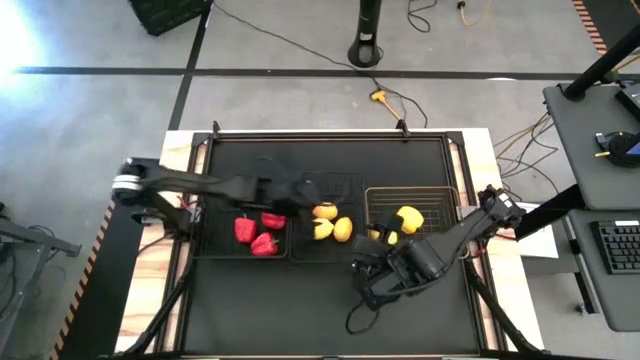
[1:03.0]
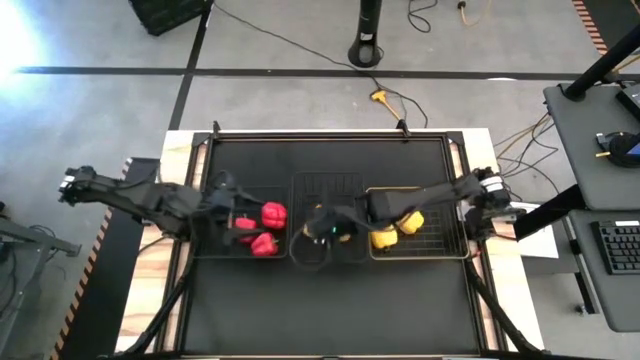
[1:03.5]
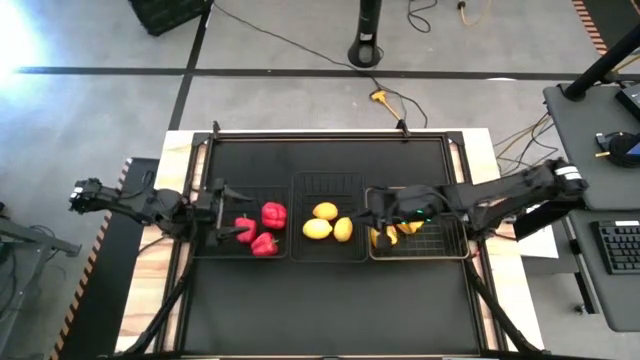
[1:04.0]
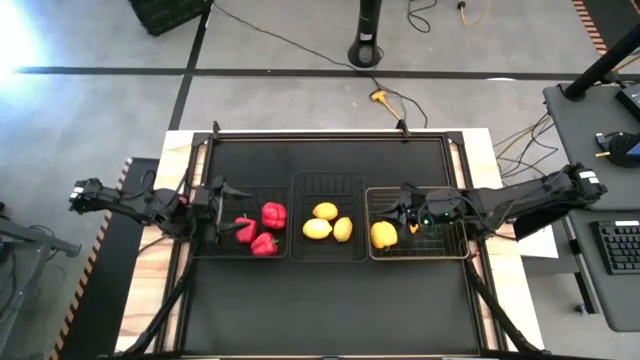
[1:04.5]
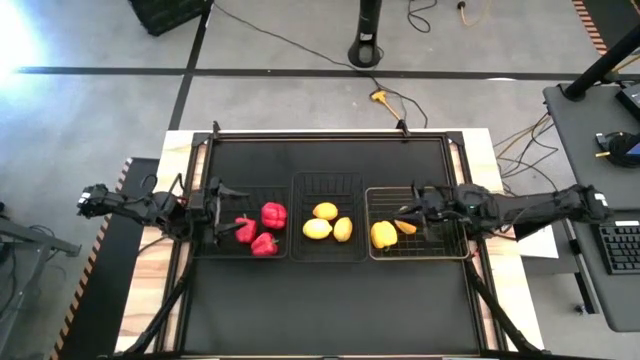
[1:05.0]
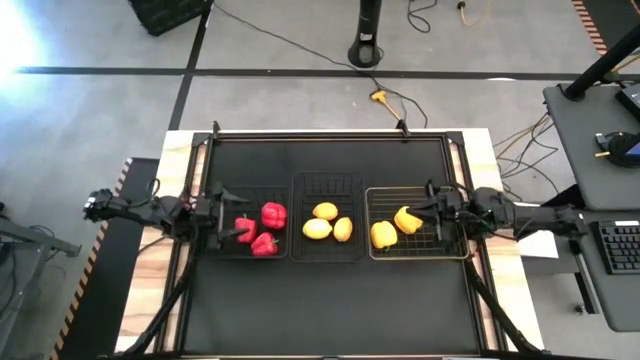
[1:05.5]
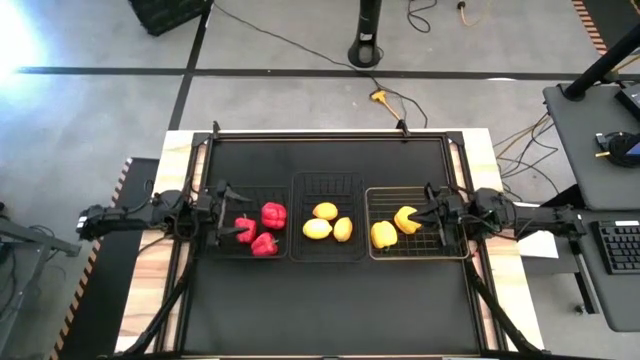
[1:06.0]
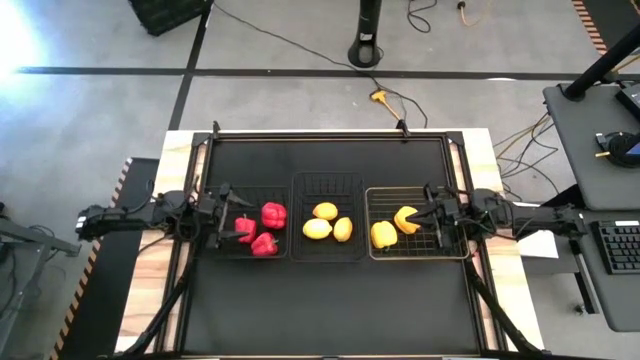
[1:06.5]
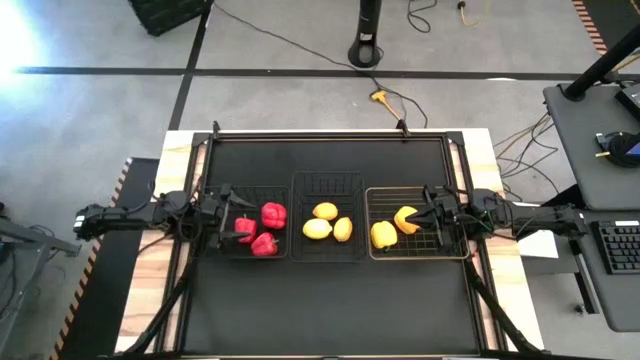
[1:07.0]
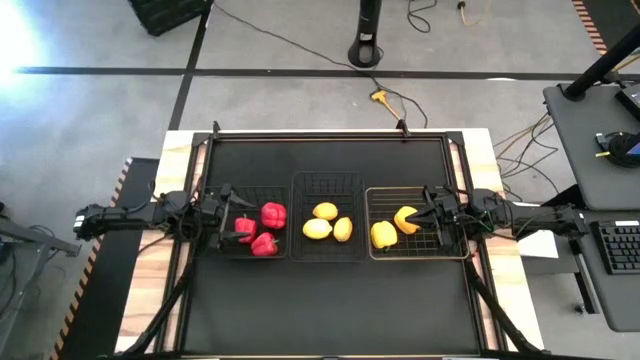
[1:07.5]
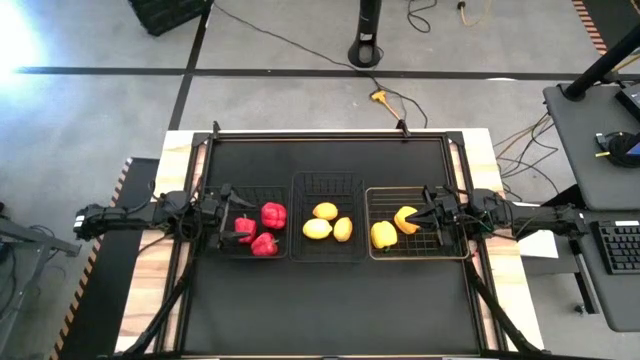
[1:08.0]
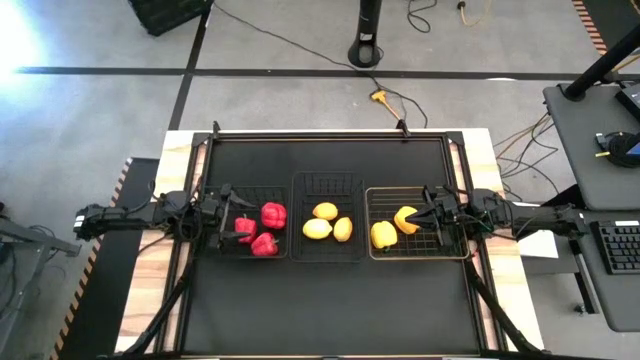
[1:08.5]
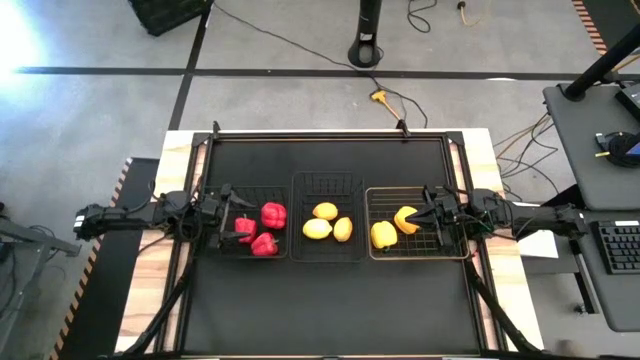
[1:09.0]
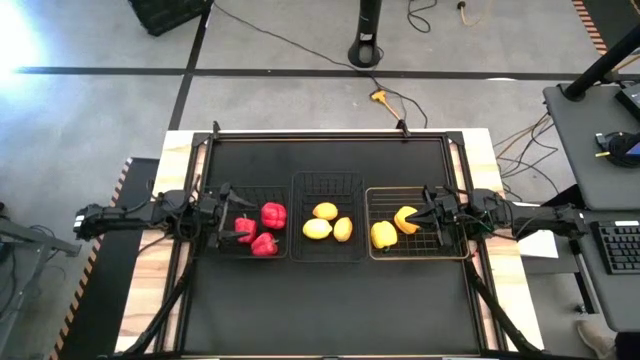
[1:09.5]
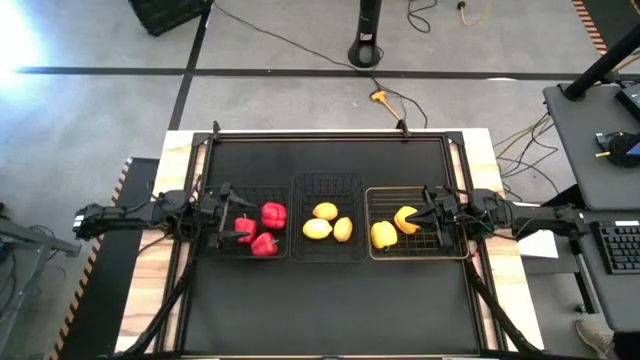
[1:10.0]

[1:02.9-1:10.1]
Task: Sort produce into baskets
Return to Home Position

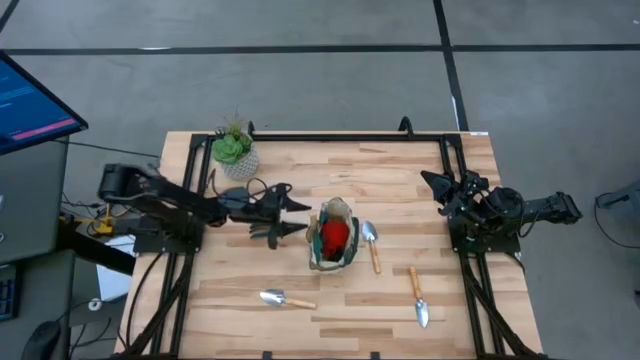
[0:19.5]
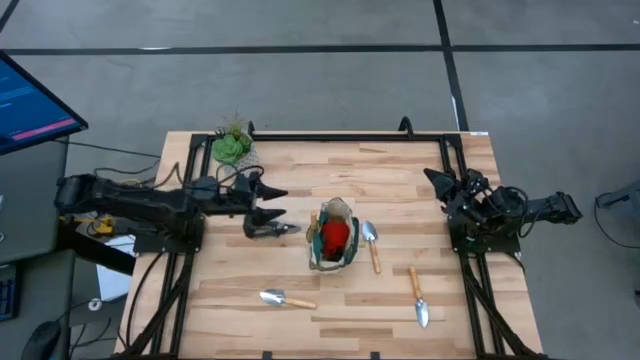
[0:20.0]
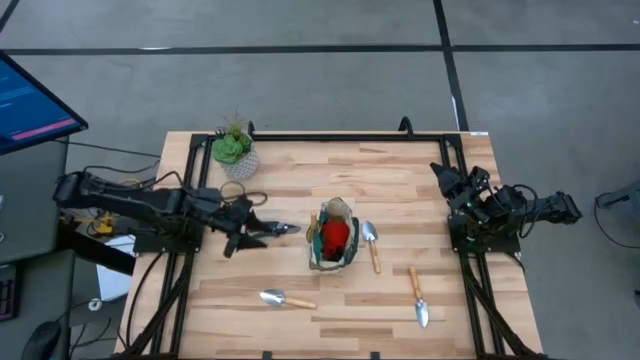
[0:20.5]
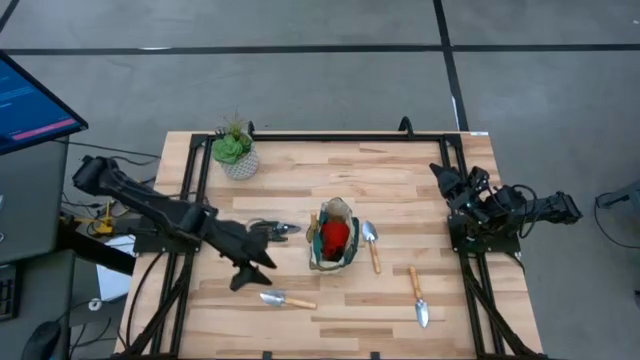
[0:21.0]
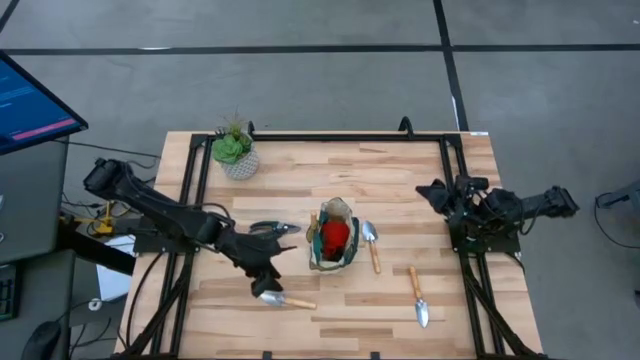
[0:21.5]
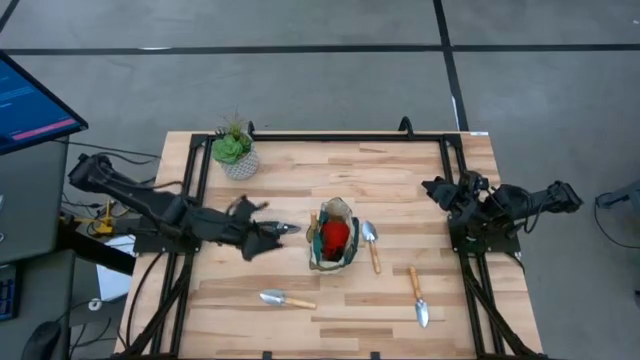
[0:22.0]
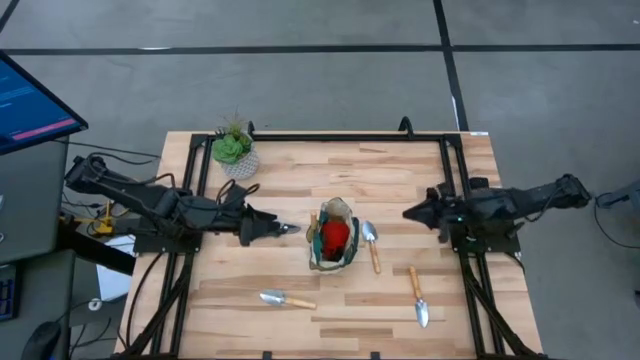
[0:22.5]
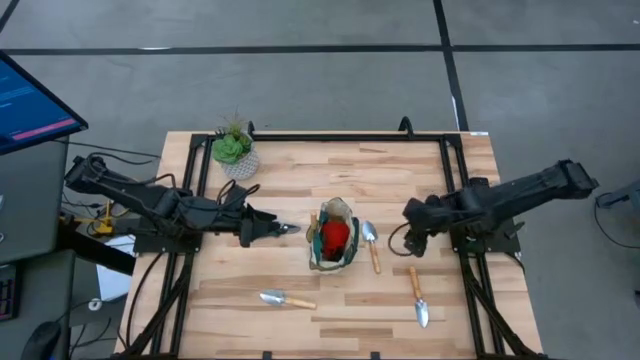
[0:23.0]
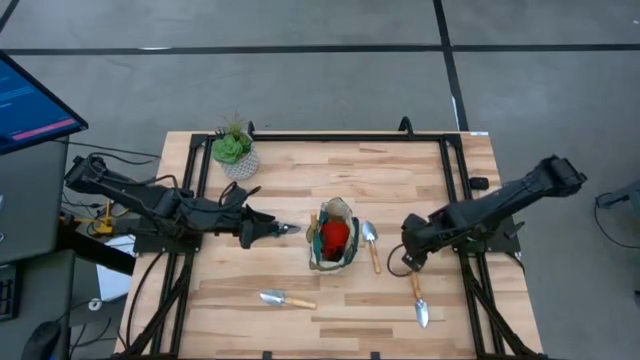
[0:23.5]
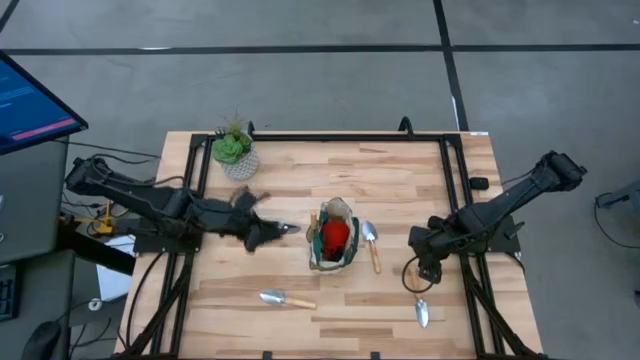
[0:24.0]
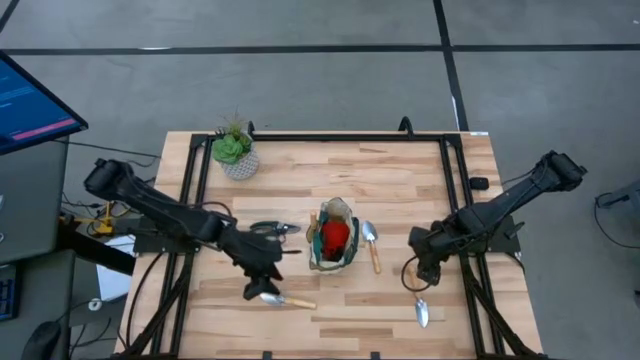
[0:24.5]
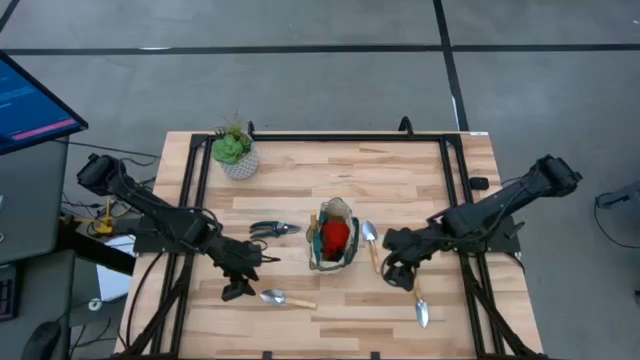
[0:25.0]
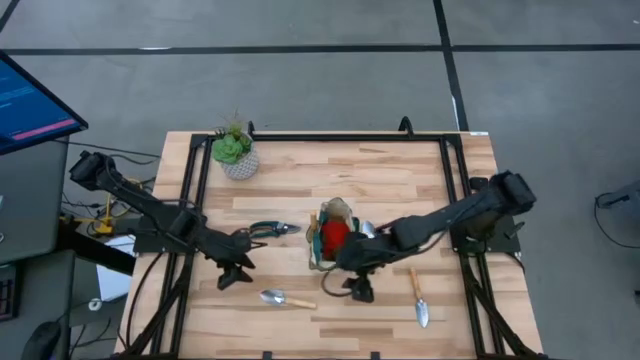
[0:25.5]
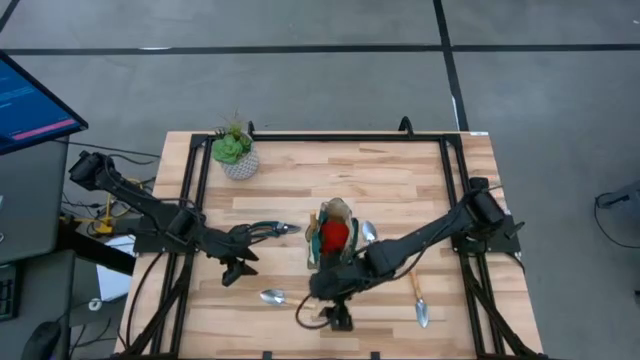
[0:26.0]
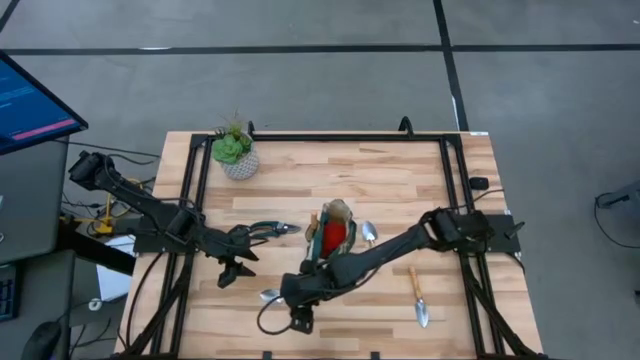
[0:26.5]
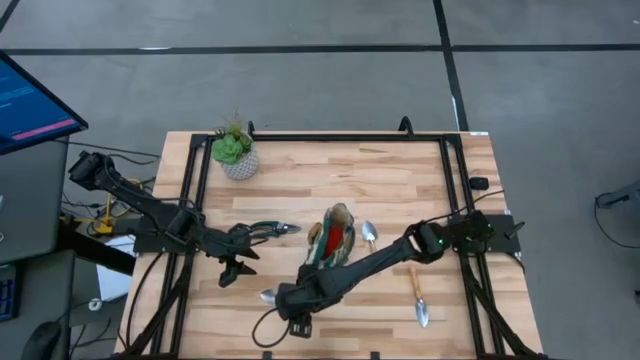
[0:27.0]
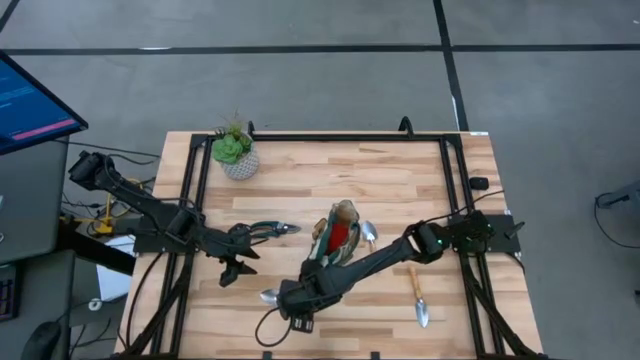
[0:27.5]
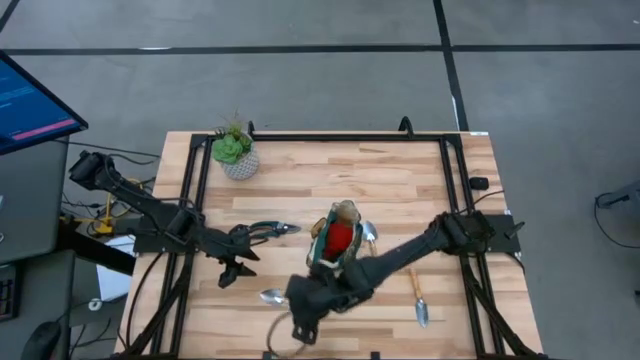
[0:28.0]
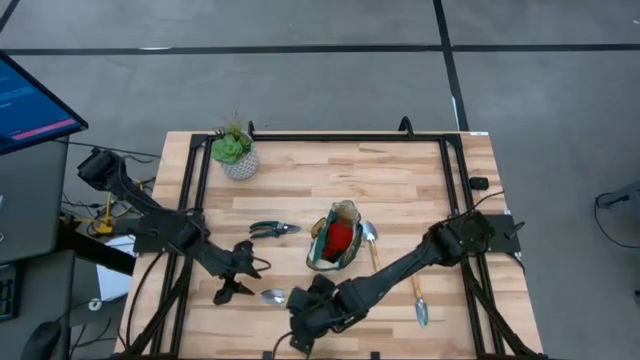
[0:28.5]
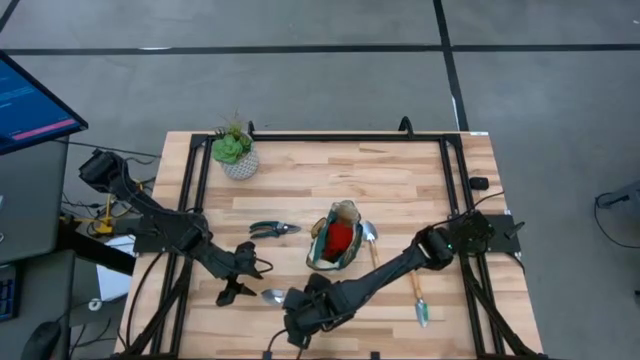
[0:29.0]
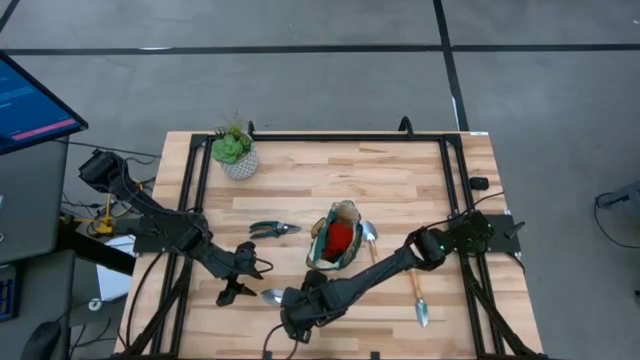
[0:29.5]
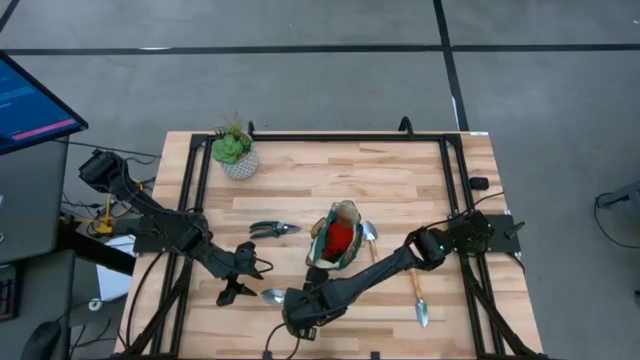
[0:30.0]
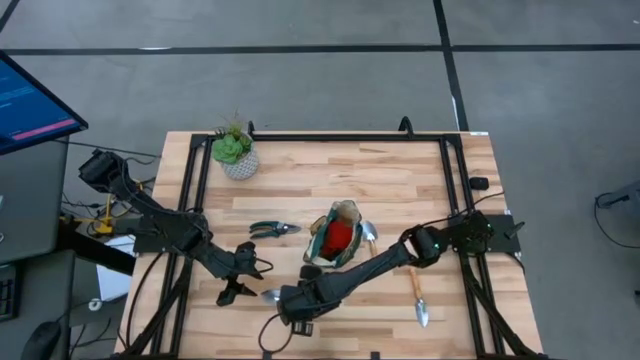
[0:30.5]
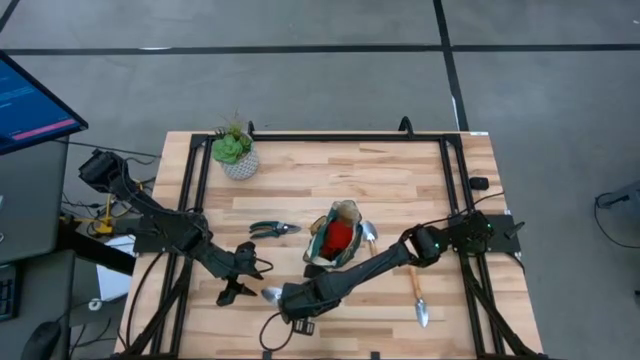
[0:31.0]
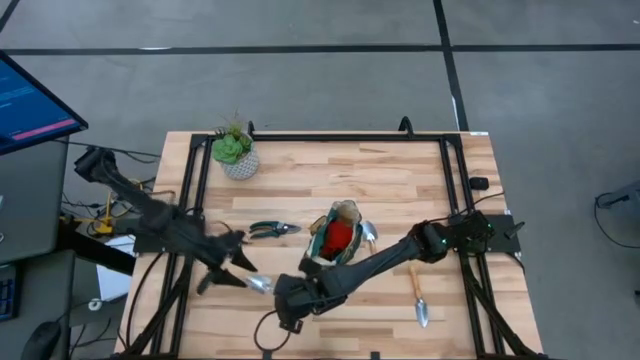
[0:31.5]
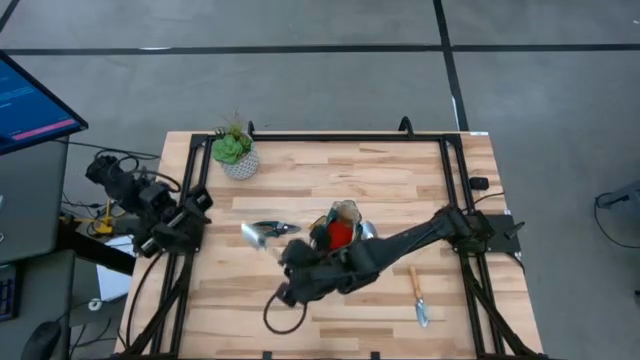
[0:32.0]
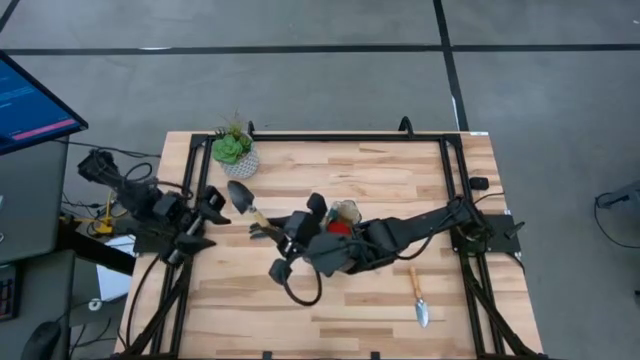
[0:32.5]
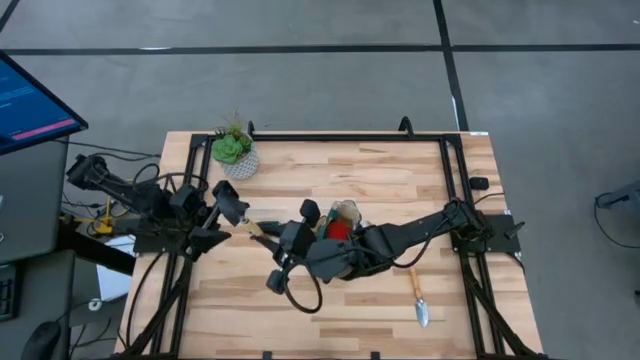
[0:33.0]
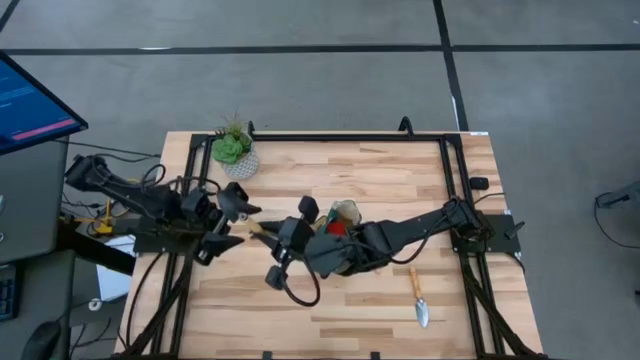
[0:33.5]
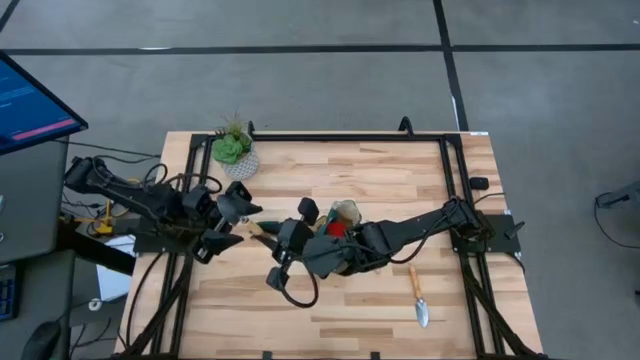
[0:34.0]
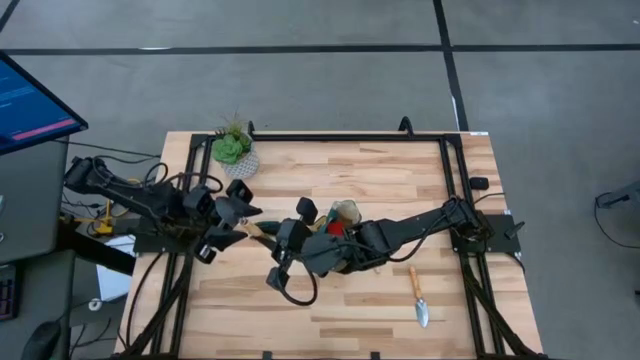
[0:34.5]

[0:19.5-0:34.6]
Task: Pick & Place Garden tools in Gardening bag
Put the trowel into the gardening bag
